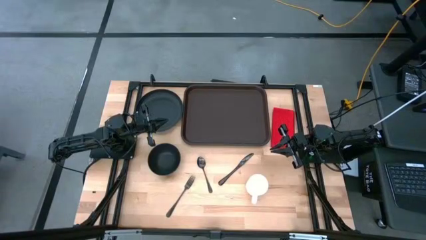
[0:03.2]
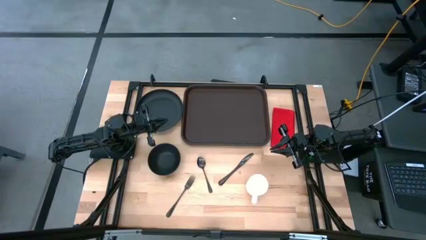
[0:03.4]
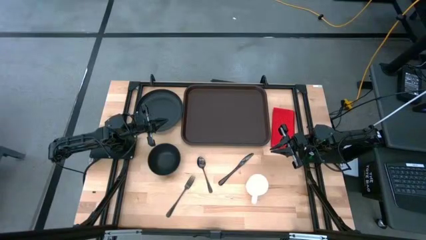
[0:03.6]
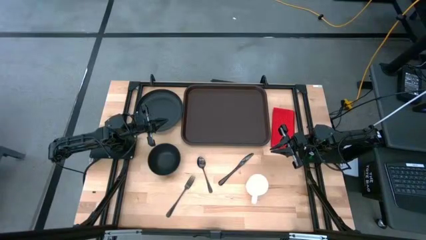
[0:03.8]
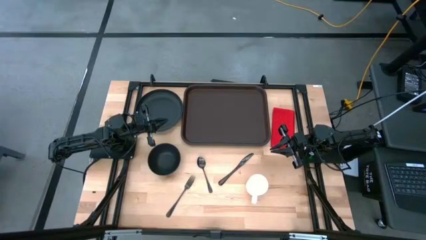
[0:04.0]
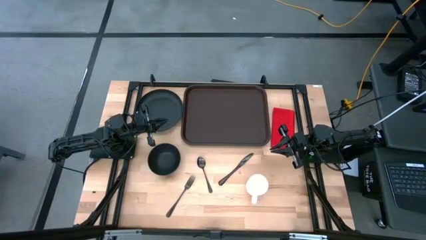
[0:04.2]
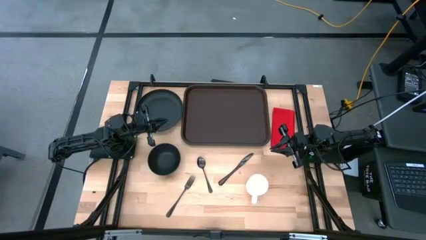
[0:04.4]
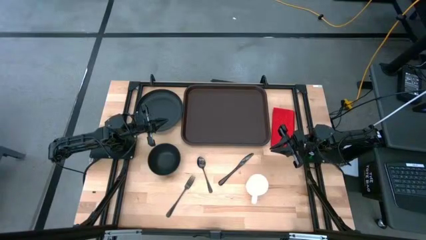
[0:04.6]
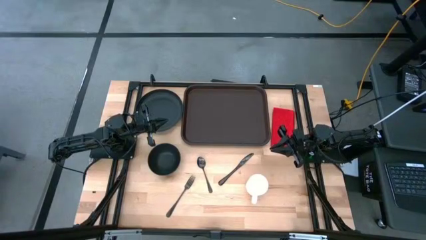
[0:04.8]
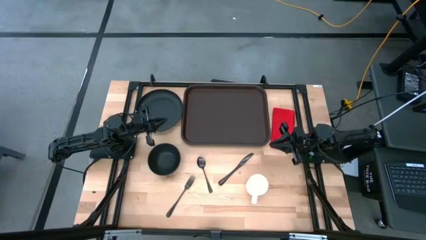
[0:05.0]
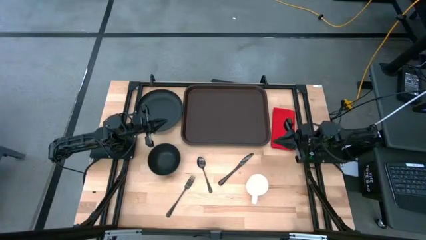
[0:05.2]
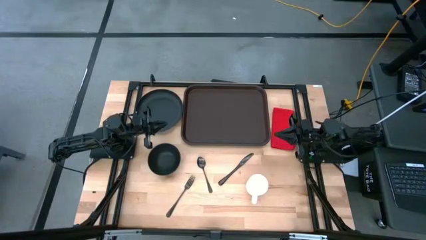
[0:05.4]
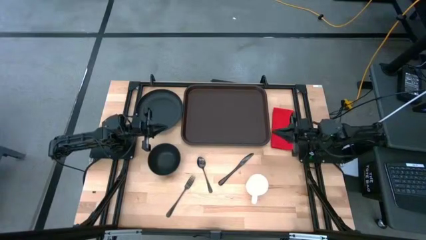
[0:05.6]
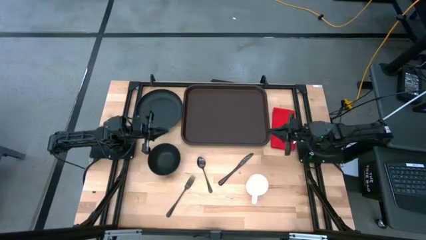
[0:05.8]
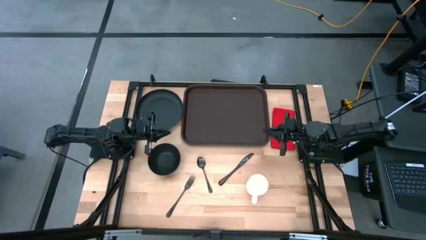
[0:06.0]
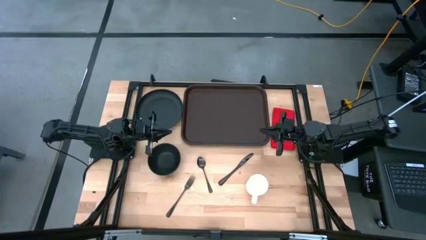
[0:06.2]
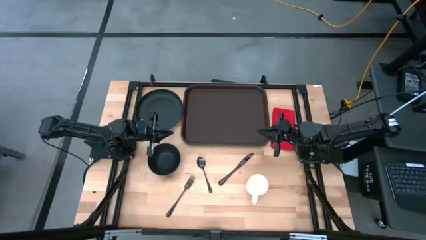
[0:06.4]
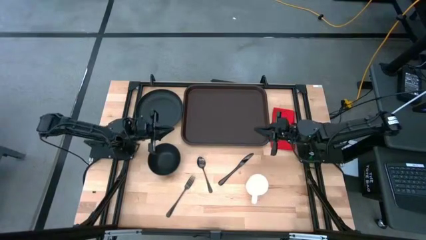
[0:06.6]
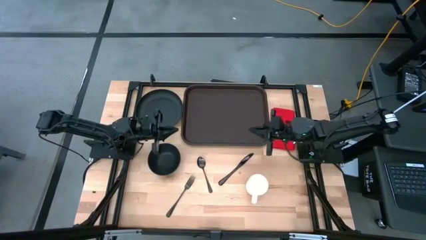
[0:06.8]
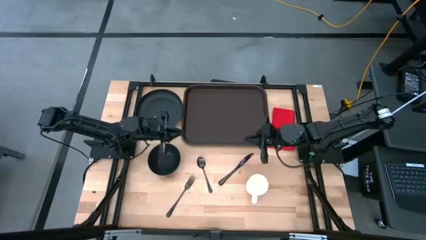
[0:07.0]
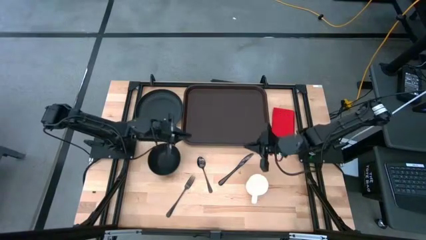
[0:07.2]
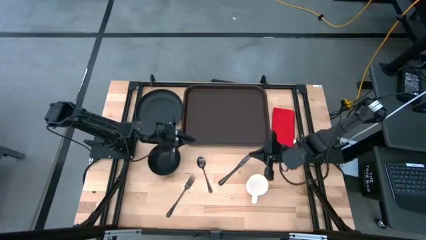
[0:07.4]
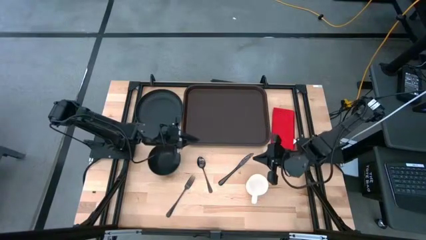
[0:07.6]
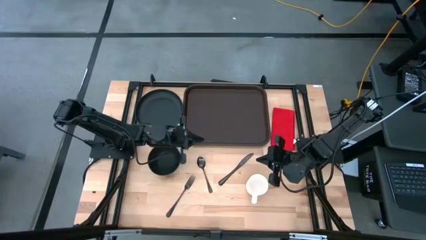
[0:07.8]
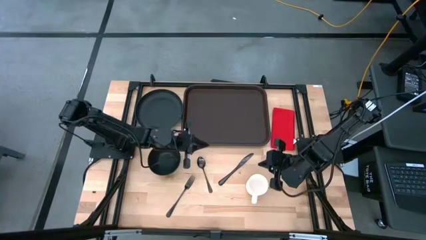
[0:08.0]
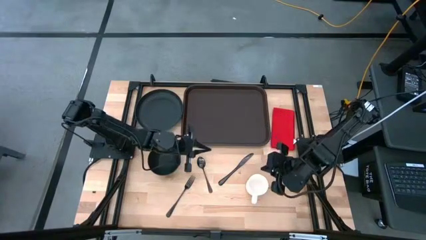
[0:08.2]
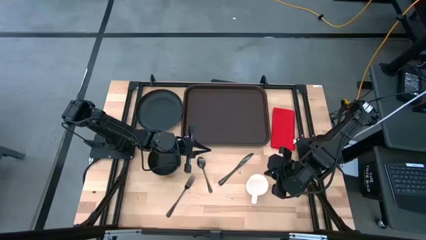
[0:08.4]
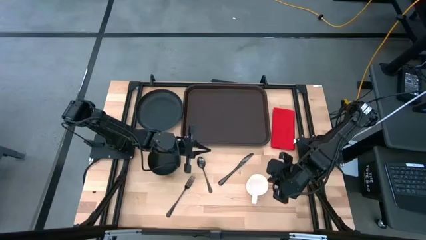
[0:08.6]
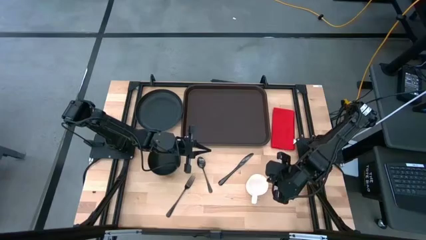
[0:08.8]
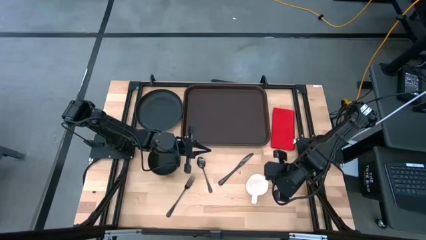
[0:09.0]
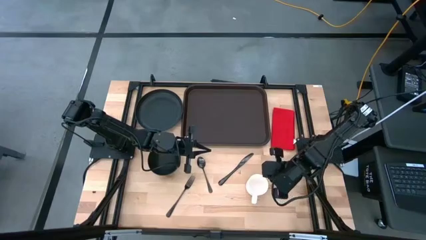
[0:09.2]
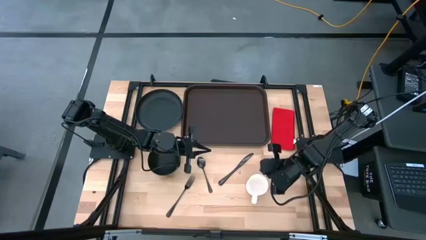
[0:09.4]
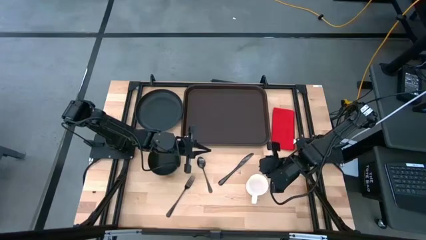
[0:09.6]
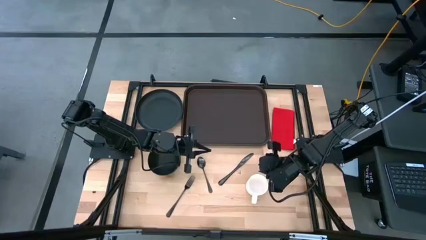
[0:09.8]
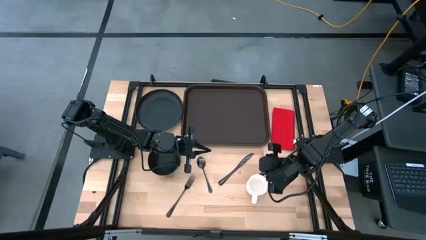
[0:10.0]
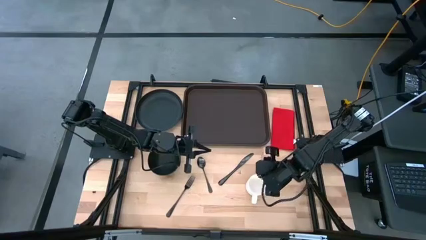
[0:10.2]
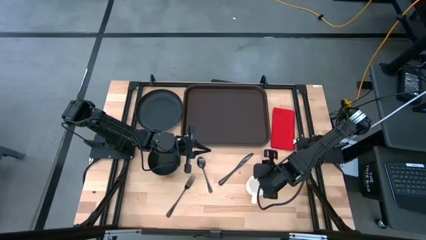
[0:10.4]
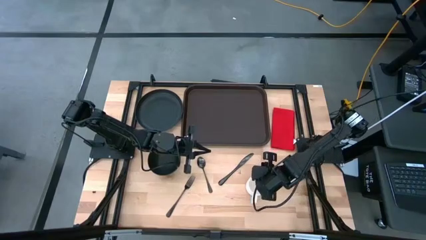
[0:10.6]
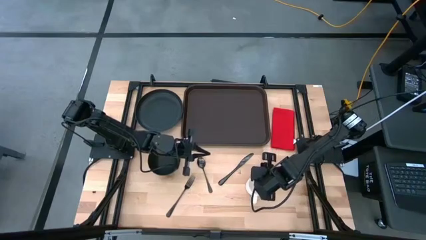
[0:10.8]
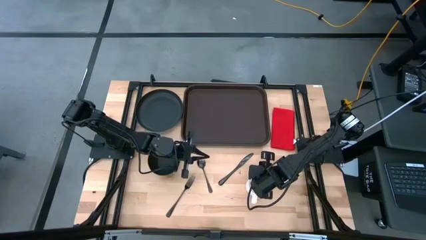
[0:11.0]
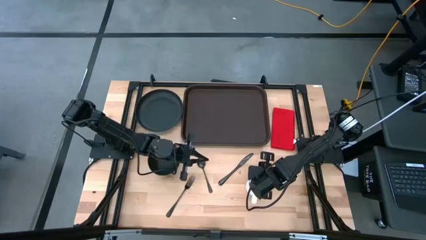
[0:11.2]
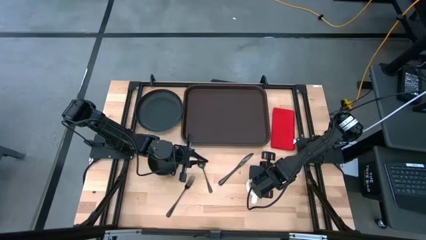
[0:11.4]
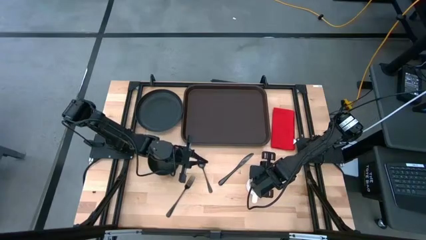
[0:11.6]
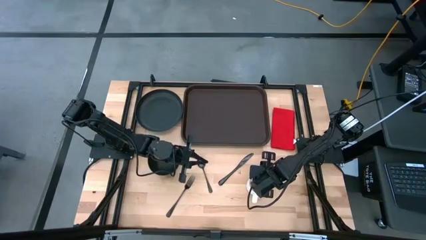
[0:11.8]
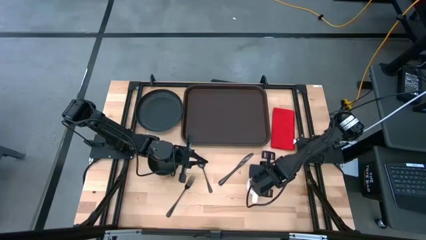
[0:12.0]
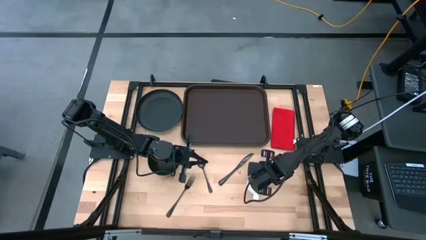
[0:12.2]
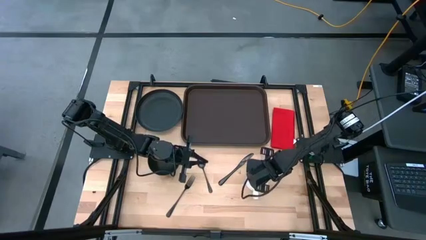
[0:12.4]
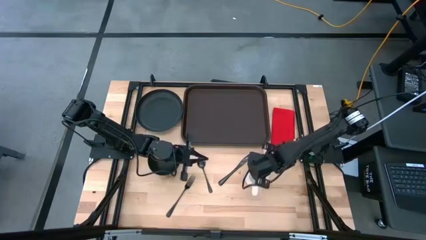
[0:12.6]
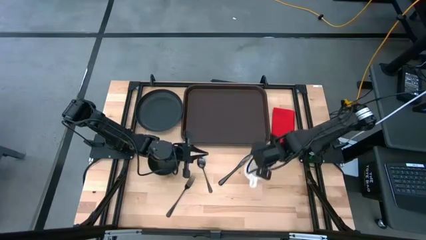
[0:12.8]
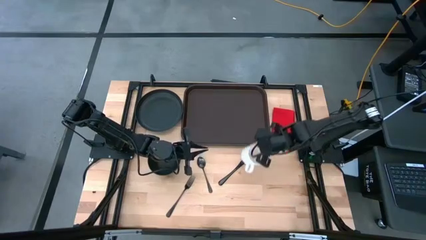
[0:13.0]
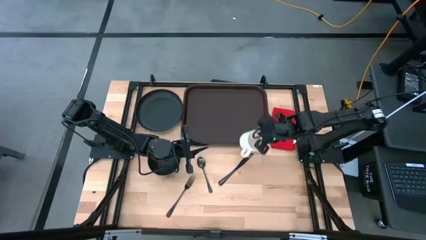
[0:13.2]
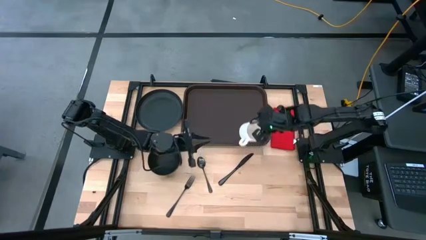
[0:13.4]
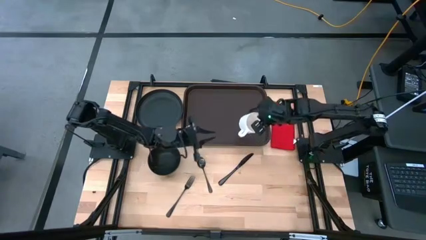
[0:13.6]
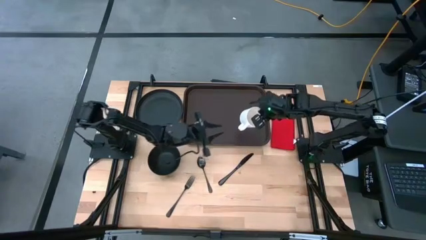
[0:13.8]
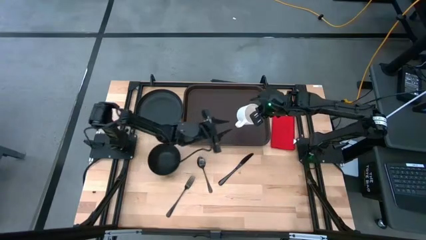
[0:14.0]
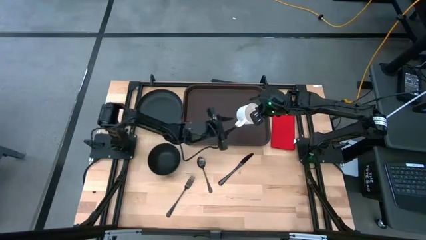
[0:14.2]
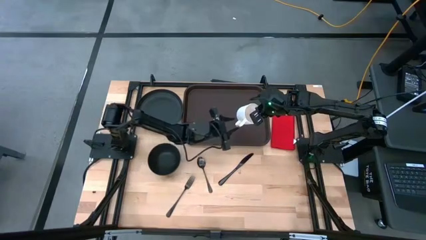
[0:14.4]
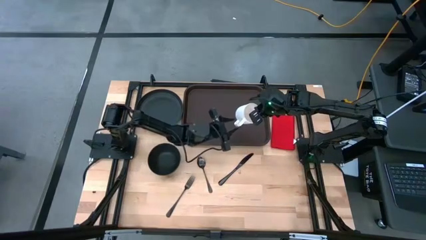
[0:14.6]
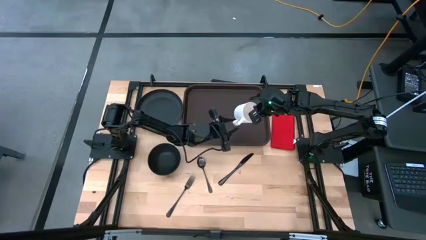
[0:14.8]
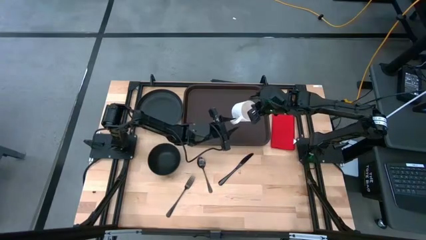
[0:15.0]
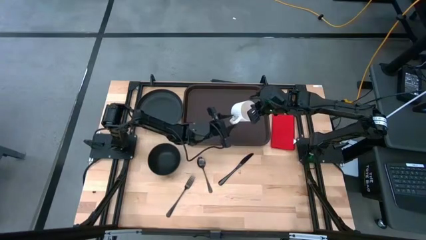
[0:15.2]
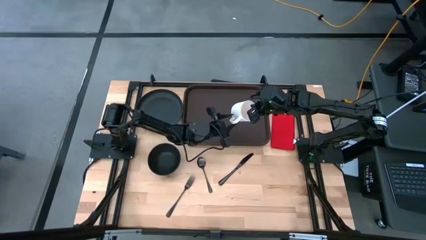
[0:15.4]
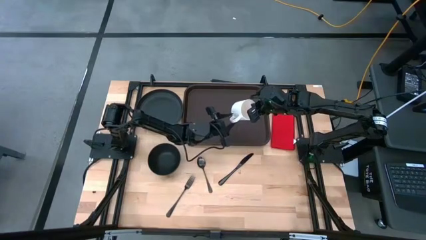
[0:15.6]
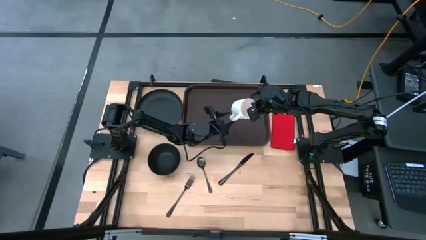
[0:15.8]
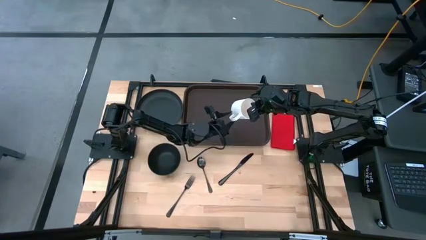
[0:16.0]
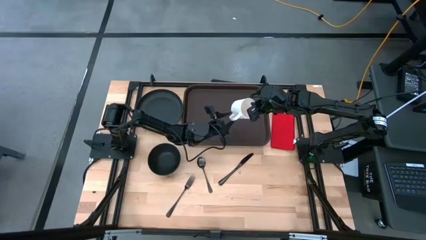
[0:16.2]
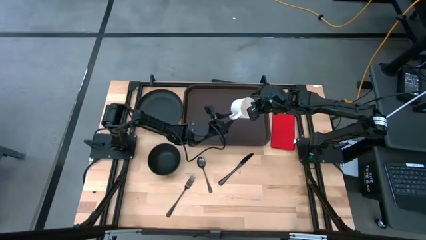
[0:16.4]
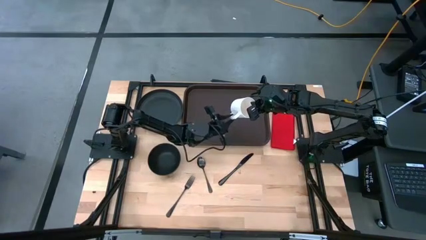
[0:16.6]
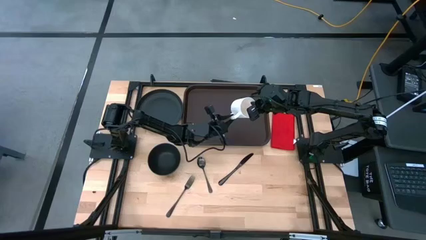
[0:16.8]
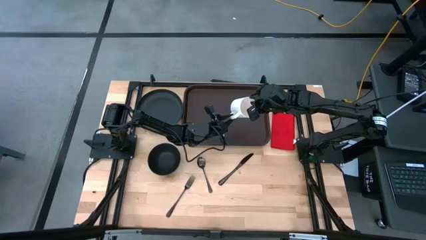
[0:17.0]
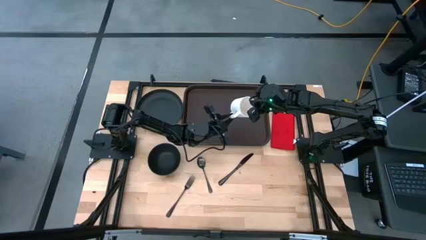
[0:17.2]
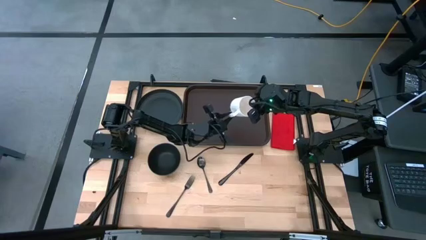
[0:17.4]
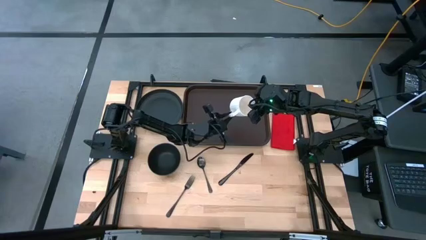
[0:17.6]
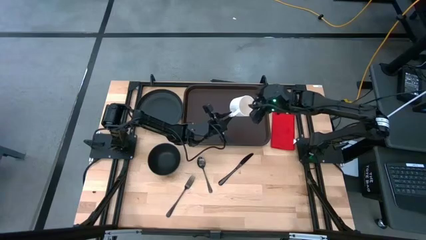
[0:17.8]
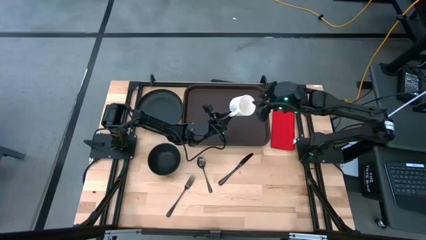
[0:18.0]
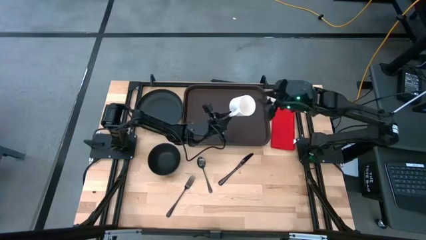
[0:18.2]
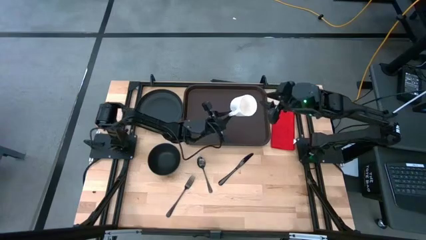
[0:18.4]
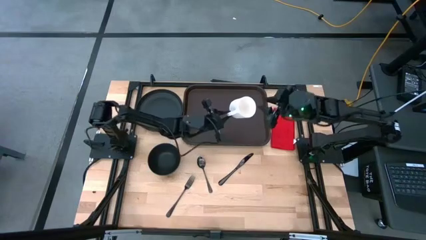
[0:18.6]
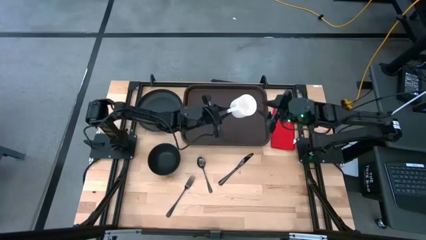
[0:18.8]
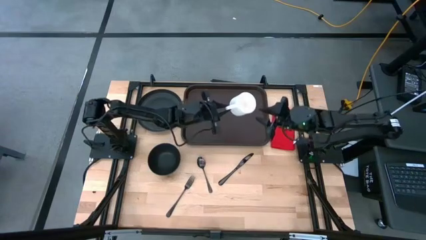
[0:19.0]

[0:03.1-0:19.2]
Task: Set up tray
Put the white mug on the top left of the brown tray
